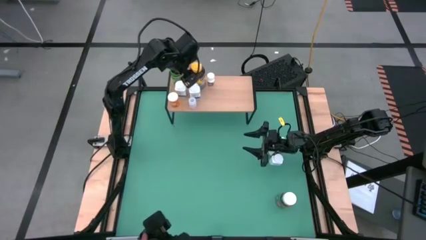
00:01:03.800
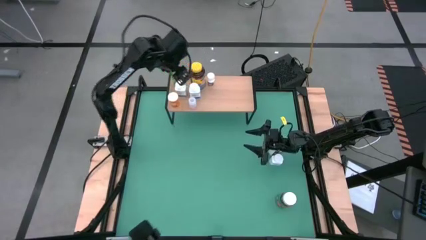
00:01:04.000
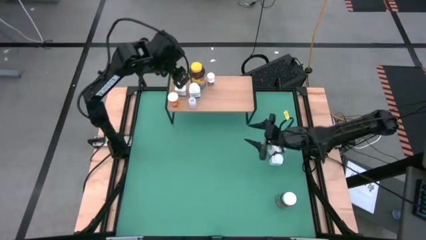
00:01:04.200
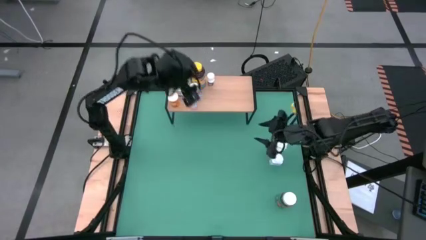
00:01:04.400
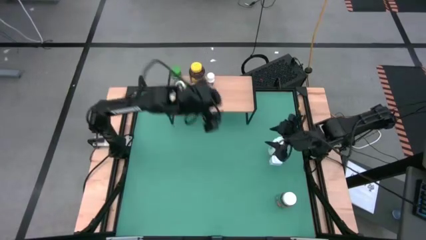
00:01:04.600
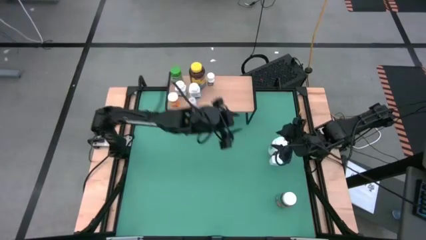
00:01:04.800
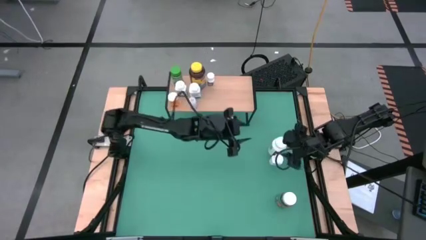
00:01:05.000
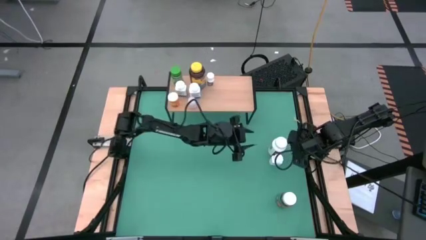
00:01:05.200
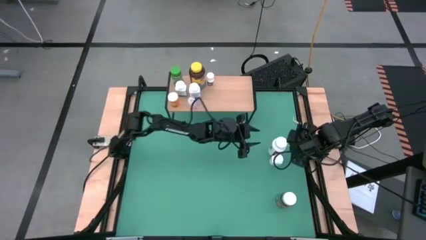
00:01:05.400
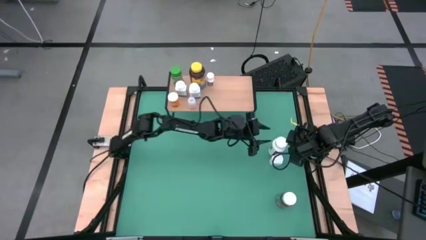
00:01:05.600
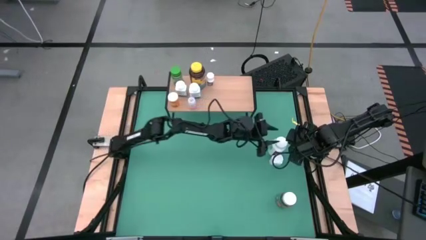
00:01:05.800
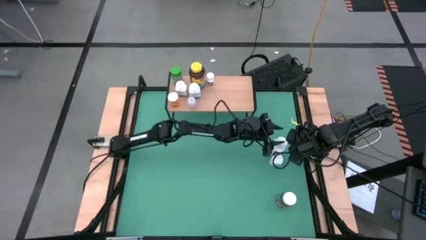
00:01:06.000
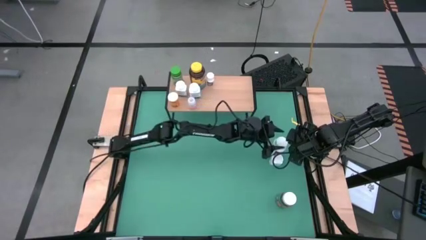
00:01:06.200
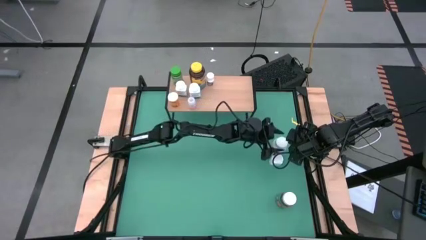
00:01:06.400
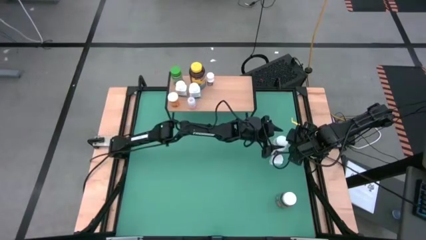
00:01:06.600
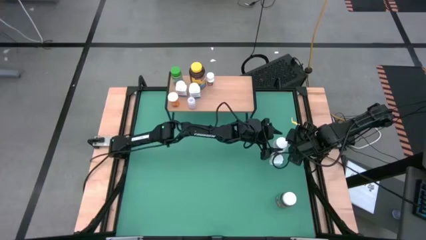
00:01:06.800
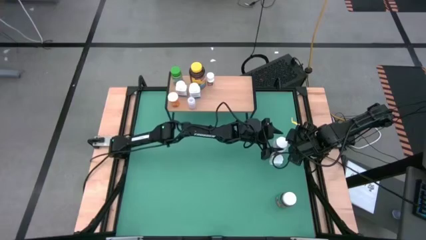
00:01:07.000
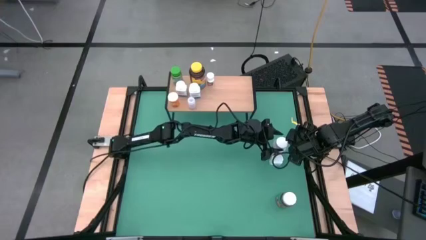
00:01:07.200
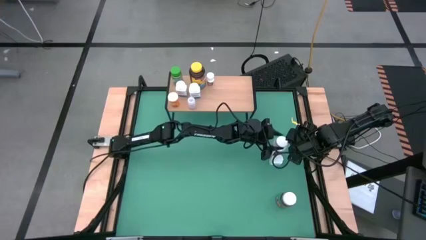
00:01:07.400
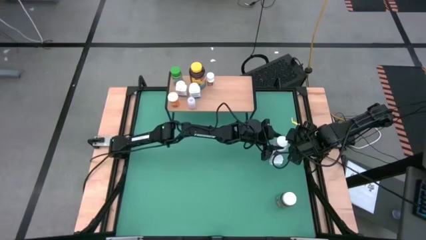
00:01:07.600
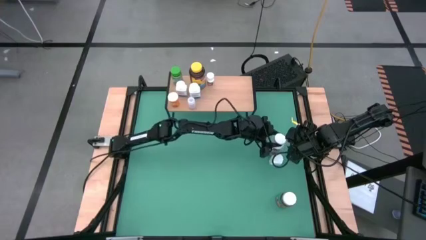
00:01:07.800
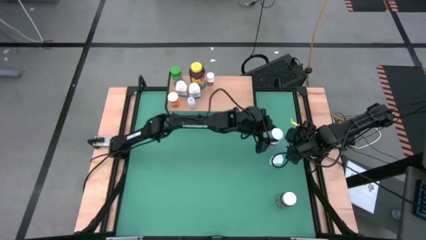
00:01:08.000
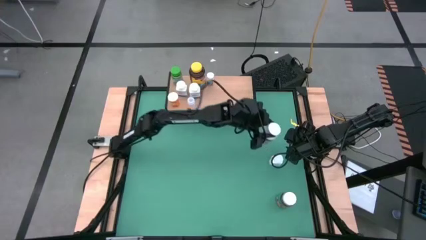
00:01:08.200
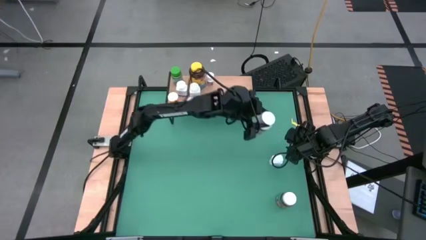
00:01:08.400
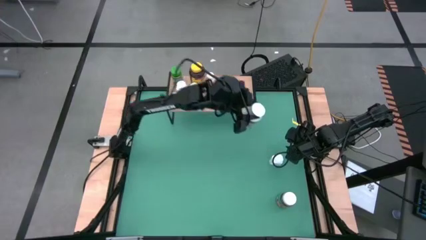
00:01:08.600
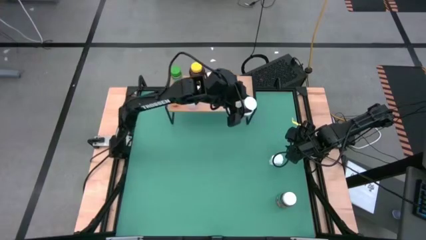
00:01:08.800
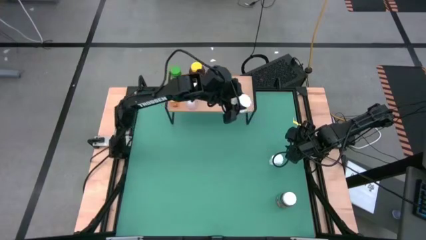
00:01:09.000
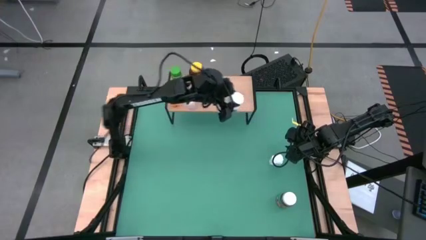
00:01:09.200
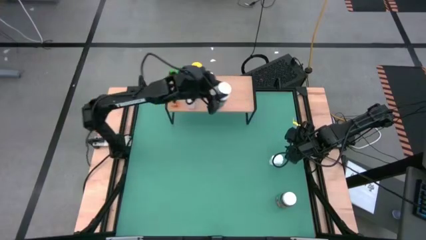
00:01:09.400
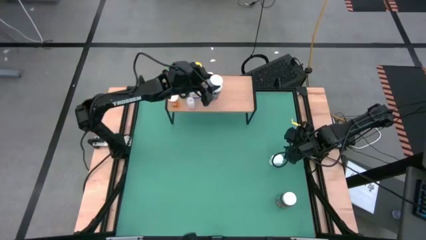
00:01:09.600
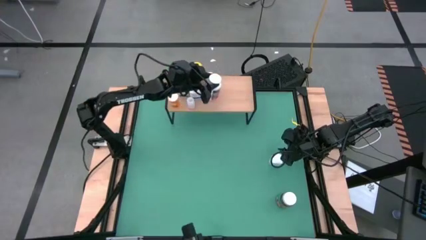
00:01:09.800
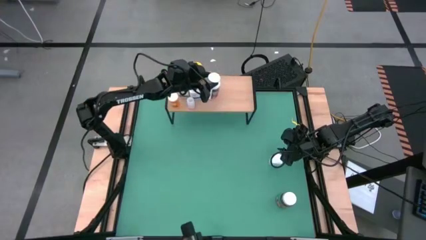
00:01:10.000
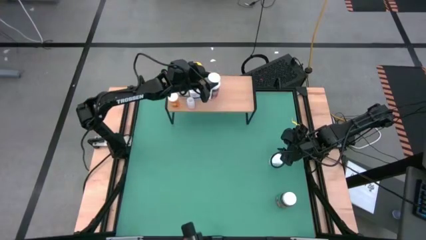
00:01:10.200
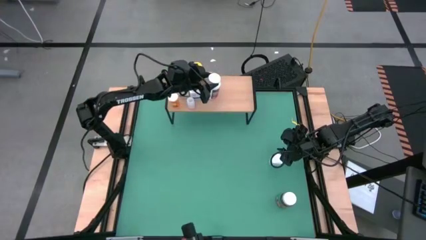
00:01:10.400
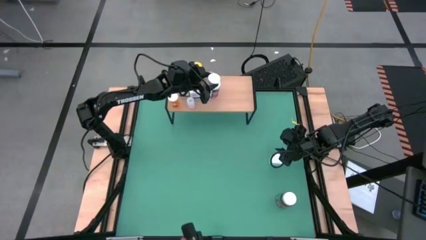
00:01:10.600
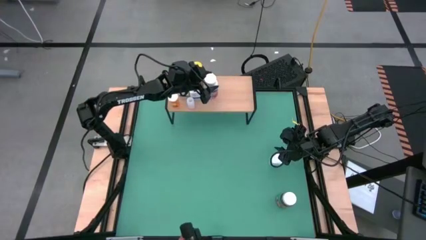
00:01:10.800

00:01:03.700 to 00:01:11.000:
Task: Pick and place medicine bottles onto shelf by color
Put the large white pill bottle on the shelf

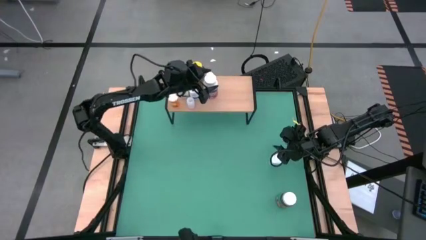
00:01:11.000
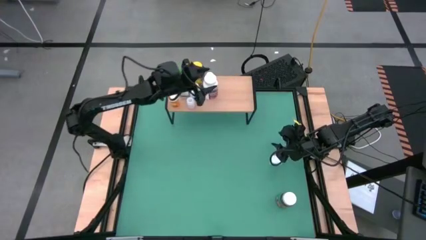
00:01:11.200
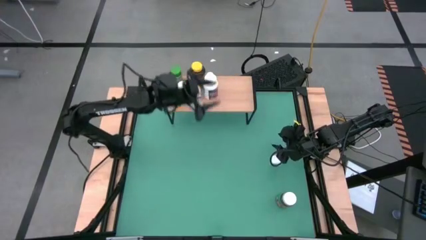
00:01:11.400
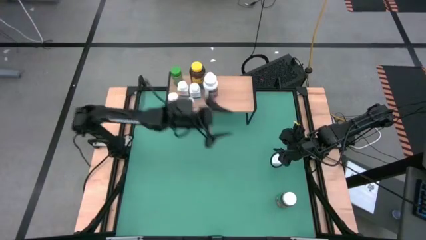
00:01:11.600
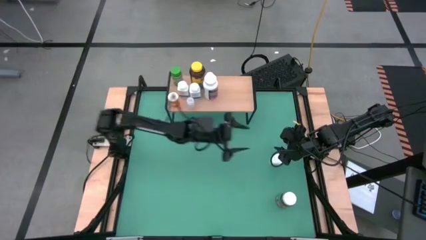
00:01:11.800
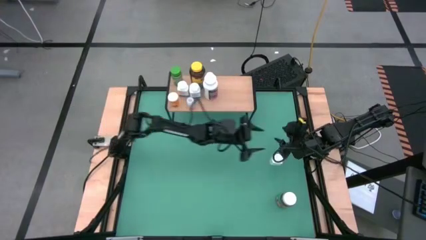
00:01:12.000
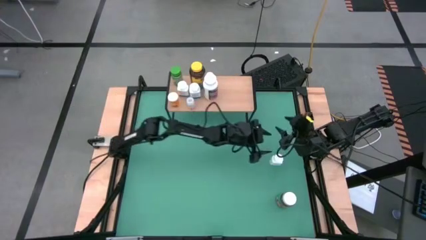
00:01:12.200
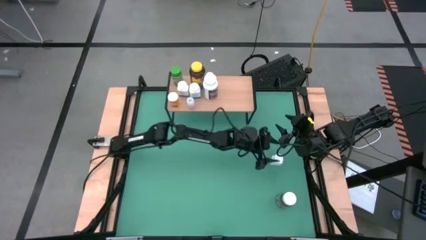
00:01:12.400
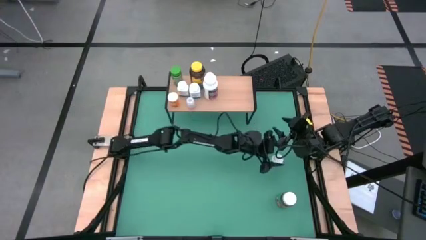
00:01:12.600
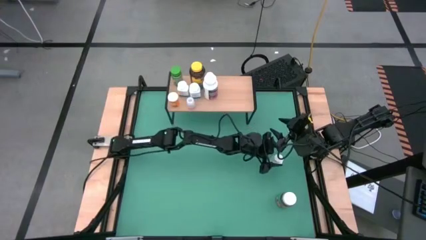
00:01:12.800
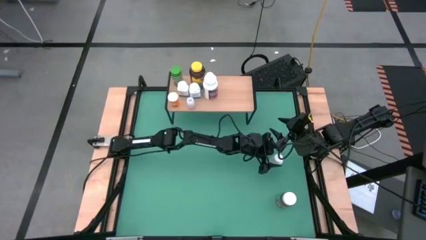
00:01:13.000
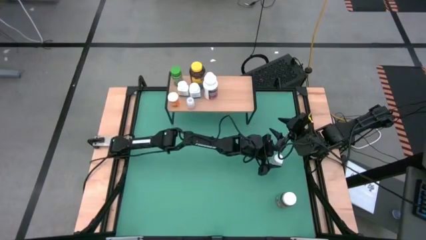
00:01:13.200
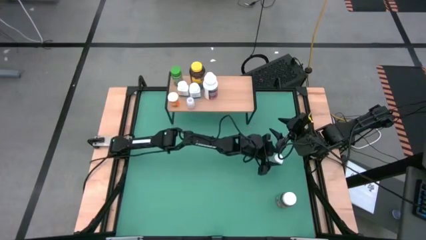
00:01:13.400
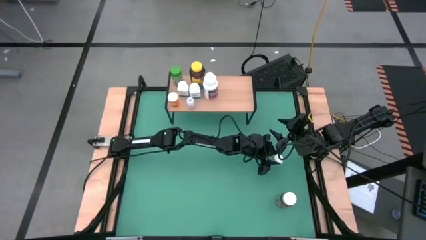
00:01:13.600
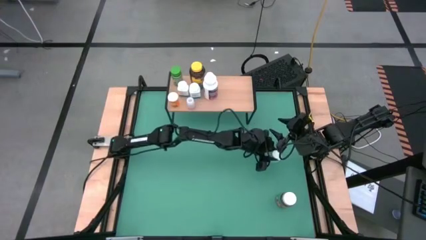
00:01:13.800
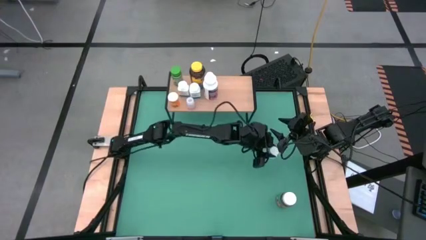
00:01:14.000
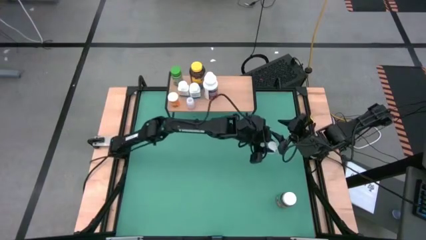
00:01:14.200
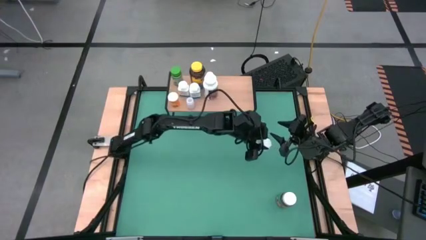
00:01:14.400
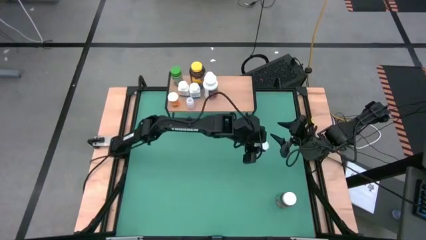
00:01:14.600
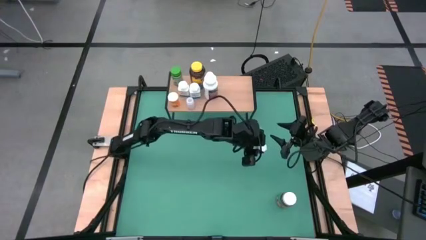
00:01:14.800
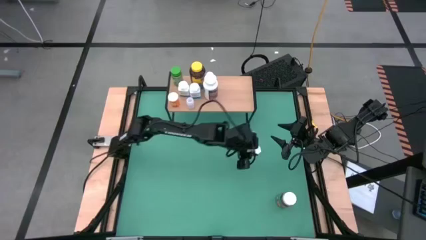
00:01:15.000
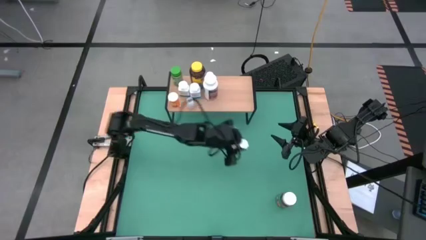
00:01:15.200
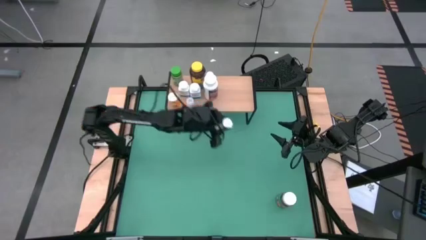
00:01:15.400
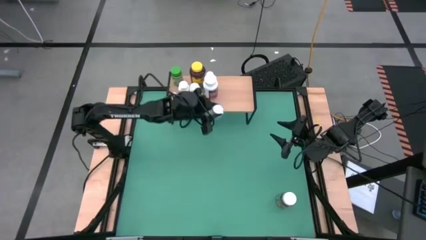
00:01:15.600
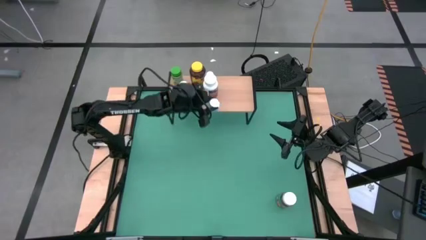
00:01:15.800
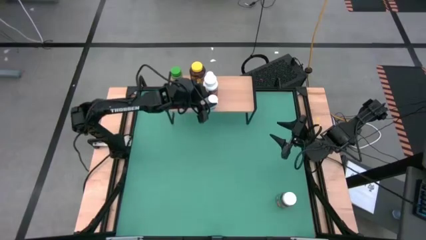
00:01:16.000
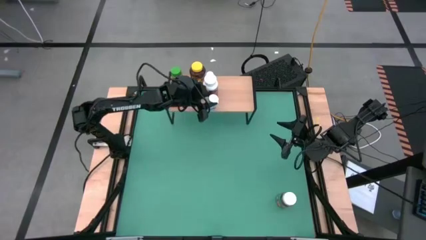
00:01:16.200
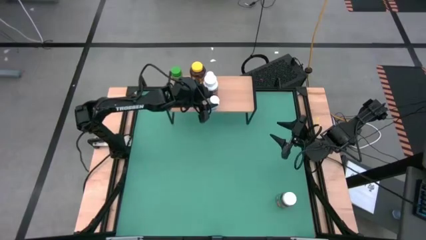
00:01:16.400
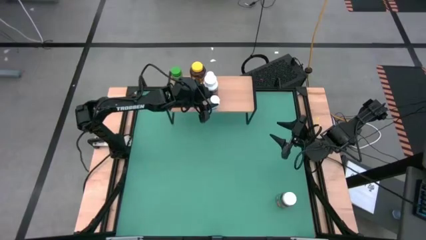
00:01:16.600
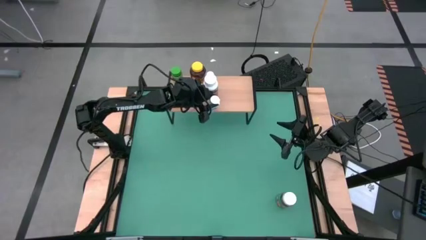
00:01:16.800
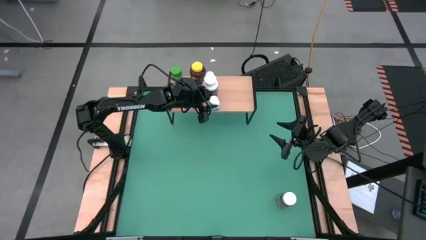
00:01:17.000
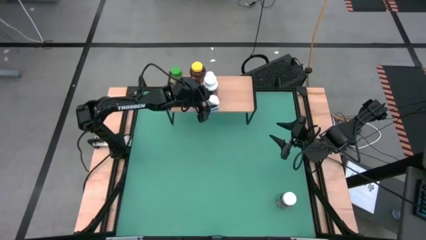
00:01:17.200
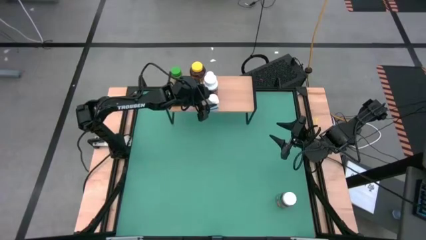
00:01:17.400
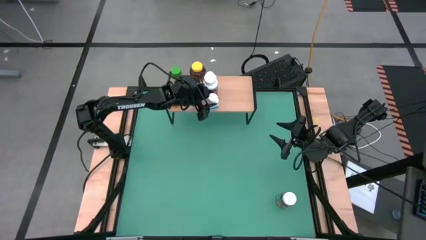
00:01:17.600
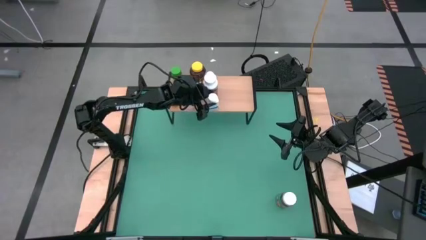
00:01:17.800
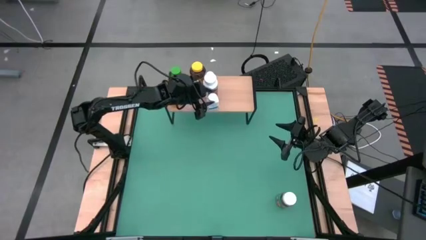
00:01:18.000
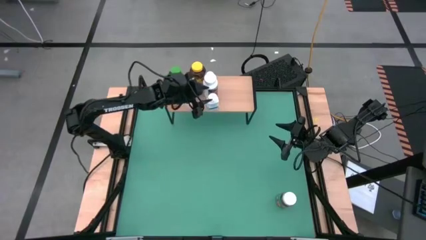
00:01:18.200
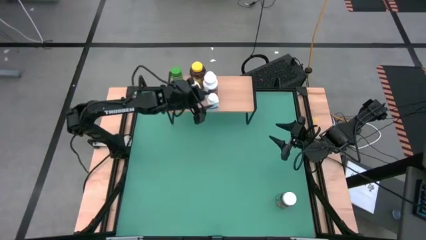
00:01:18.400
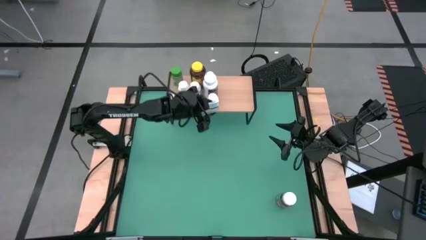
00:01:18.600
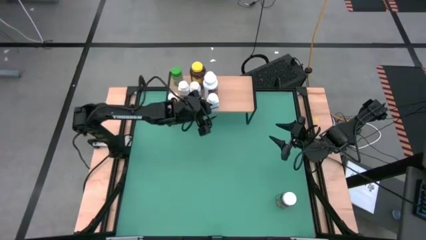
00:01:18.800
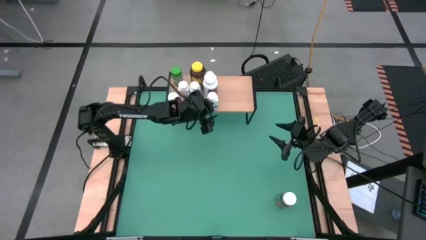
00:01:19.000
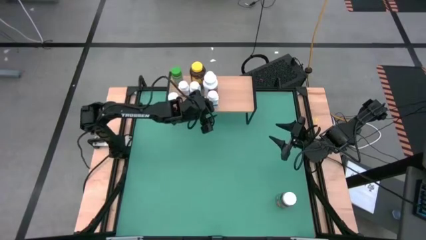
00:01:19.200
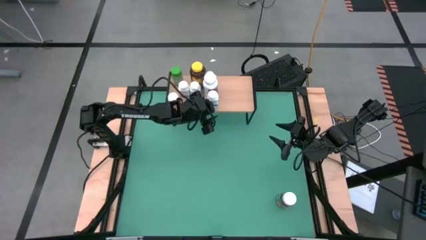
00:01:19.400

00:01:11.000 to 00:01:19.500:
Put the white and blue pill bottle on the shelf
